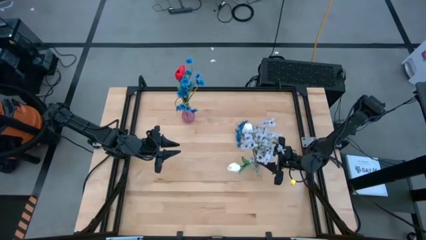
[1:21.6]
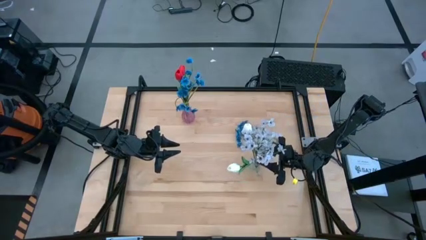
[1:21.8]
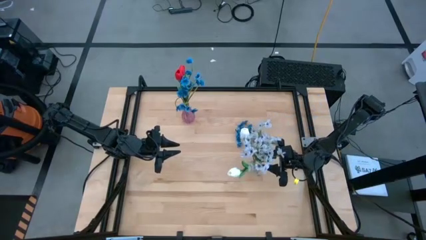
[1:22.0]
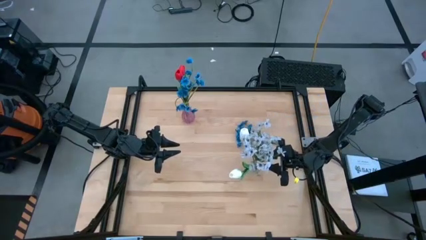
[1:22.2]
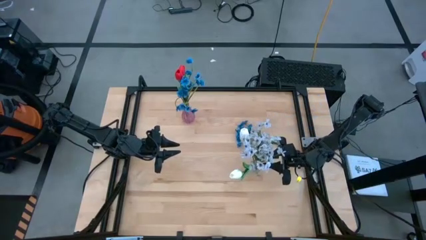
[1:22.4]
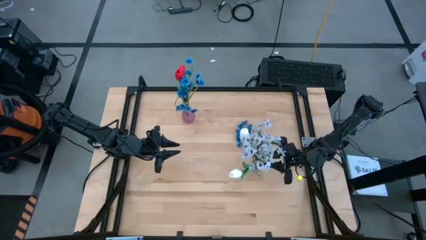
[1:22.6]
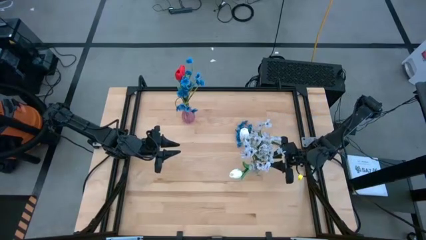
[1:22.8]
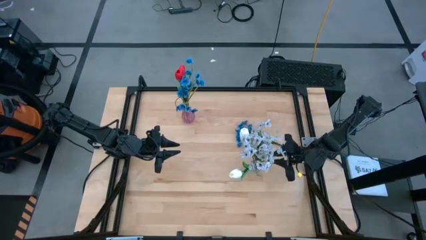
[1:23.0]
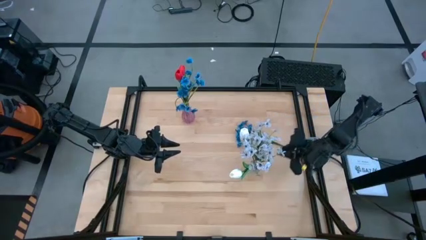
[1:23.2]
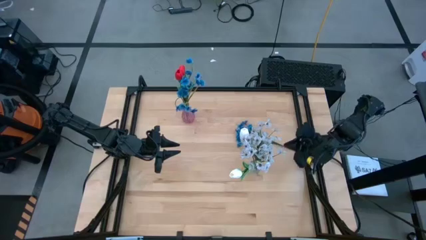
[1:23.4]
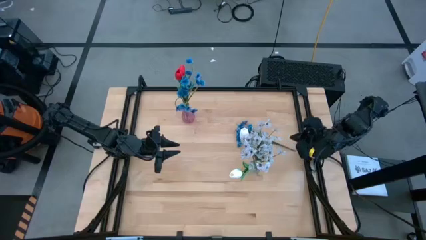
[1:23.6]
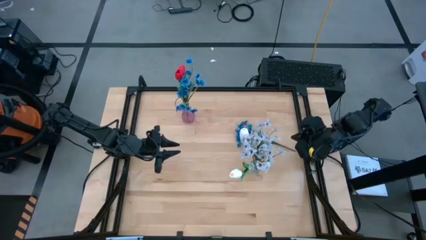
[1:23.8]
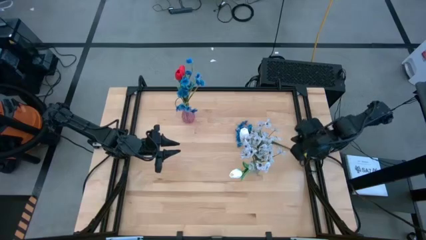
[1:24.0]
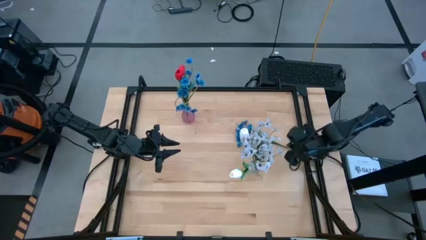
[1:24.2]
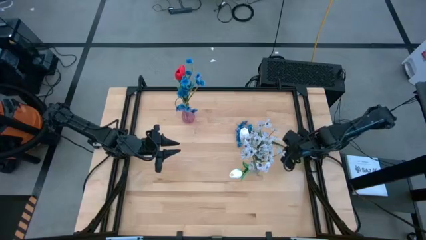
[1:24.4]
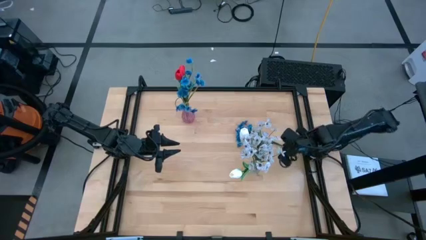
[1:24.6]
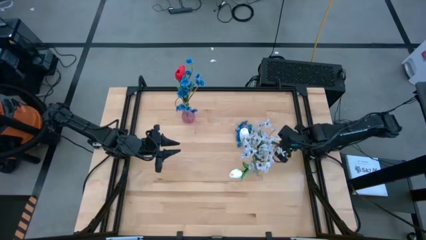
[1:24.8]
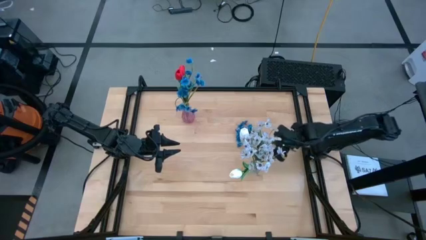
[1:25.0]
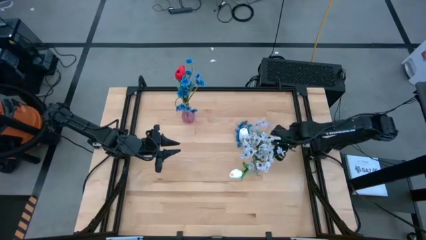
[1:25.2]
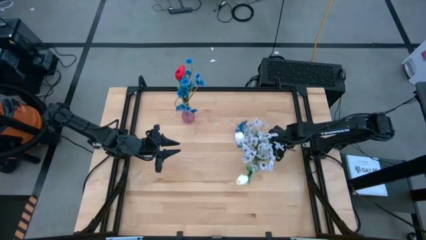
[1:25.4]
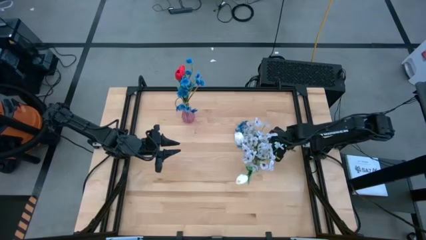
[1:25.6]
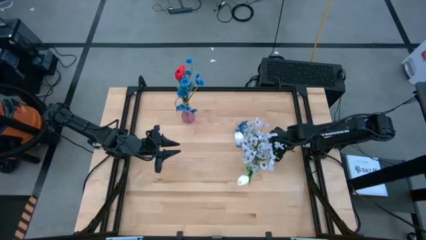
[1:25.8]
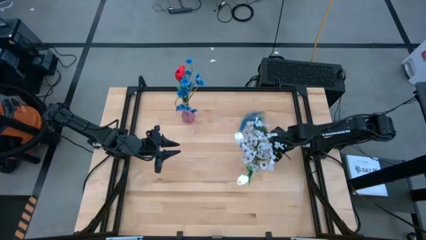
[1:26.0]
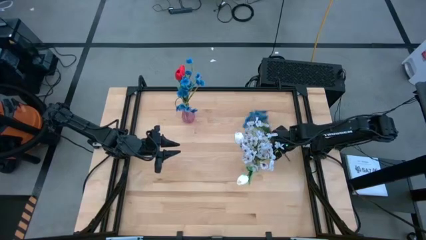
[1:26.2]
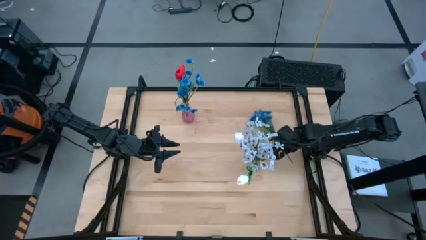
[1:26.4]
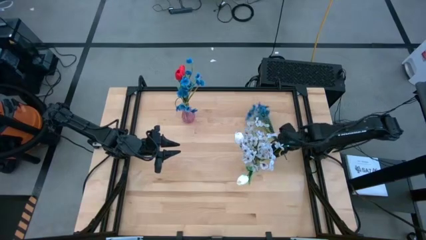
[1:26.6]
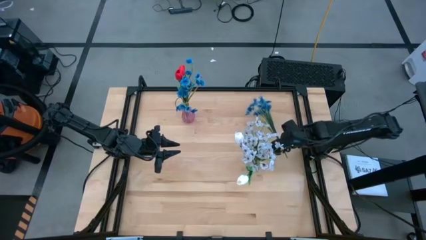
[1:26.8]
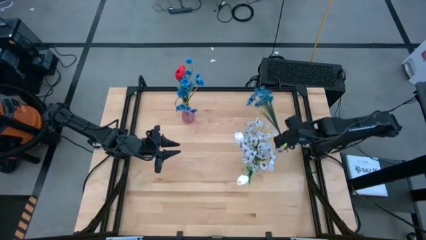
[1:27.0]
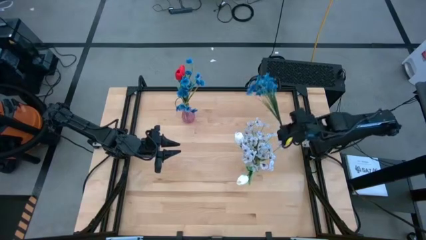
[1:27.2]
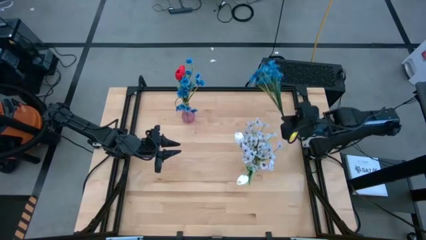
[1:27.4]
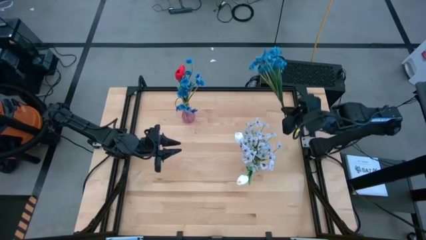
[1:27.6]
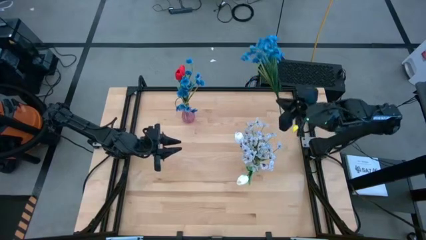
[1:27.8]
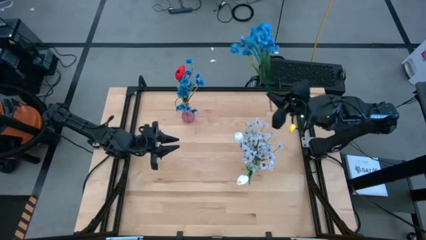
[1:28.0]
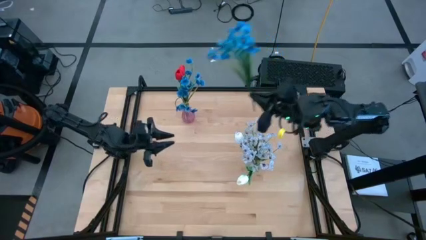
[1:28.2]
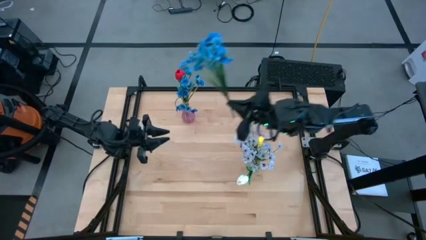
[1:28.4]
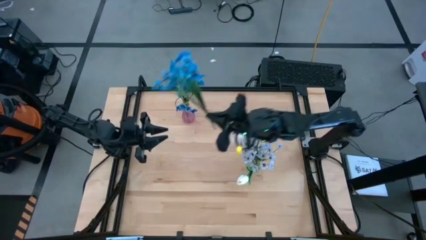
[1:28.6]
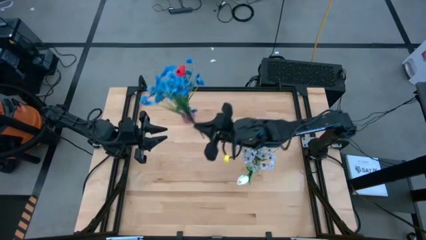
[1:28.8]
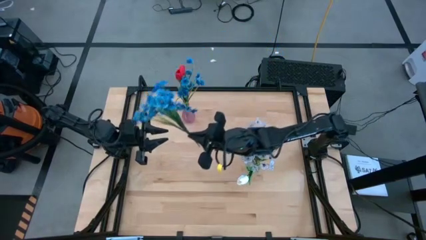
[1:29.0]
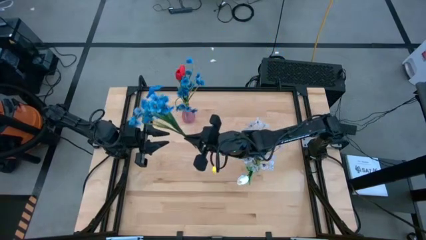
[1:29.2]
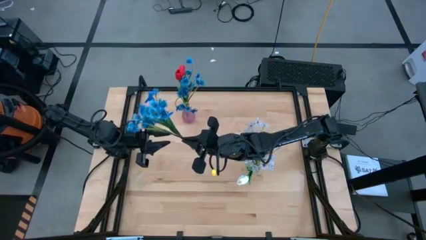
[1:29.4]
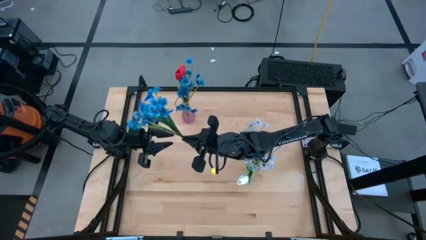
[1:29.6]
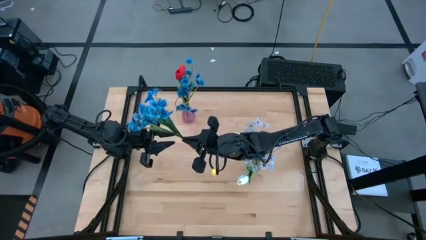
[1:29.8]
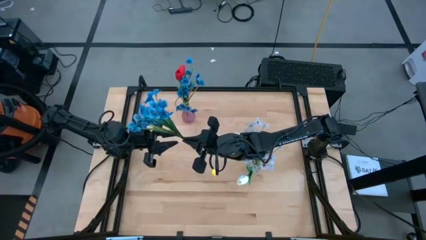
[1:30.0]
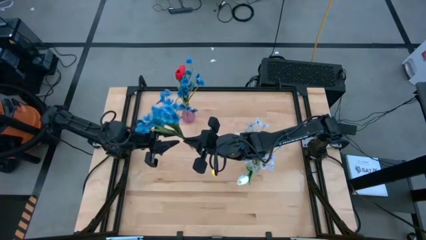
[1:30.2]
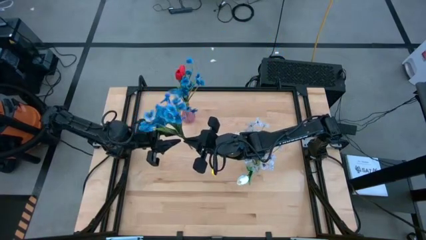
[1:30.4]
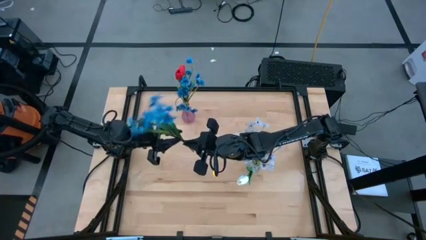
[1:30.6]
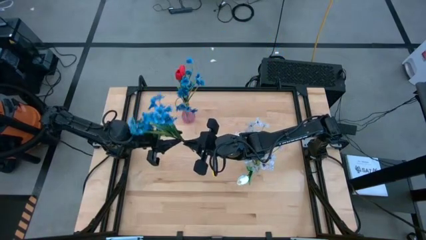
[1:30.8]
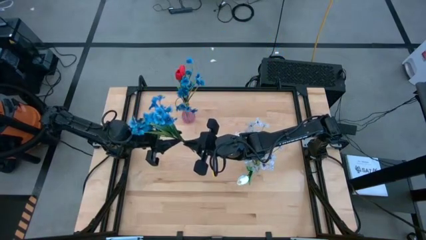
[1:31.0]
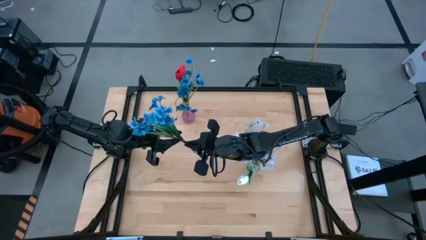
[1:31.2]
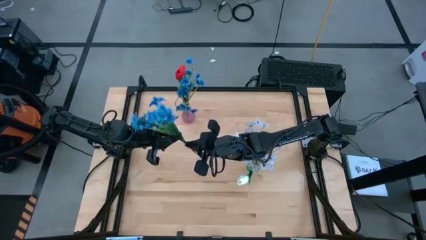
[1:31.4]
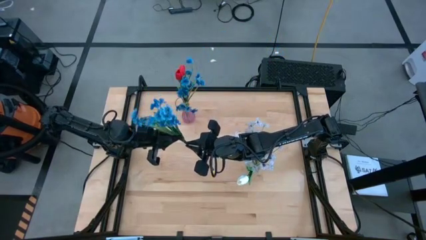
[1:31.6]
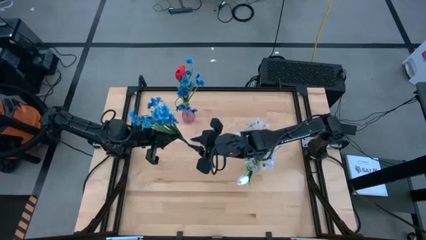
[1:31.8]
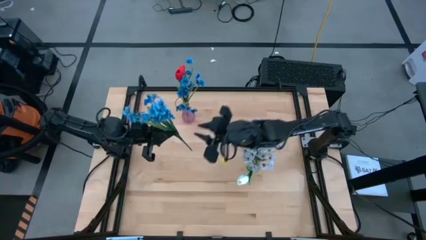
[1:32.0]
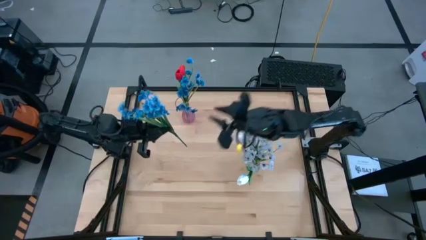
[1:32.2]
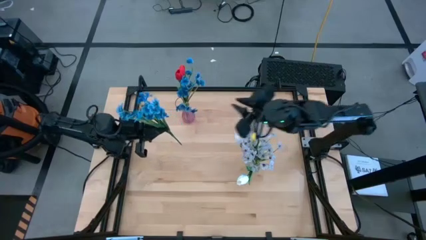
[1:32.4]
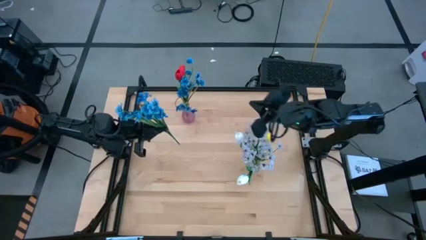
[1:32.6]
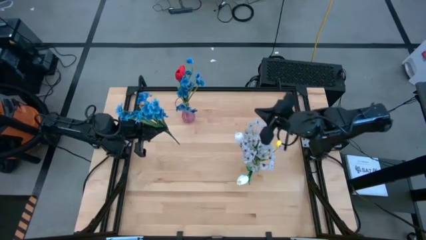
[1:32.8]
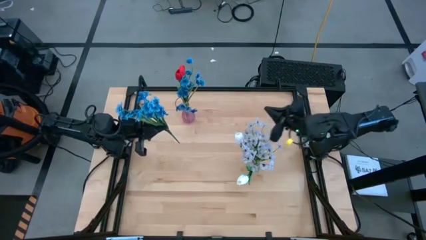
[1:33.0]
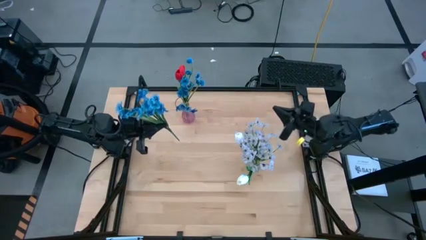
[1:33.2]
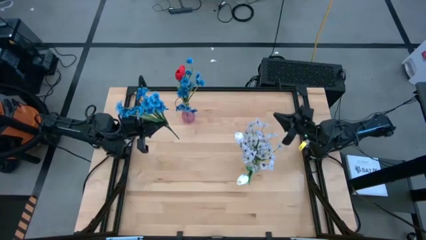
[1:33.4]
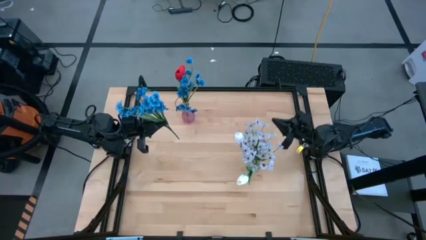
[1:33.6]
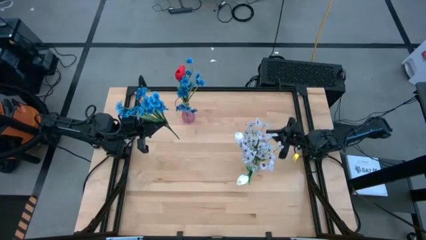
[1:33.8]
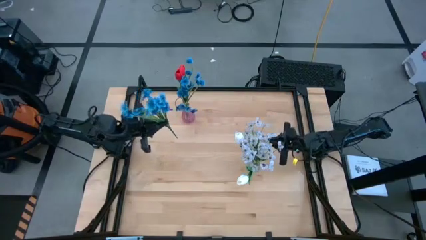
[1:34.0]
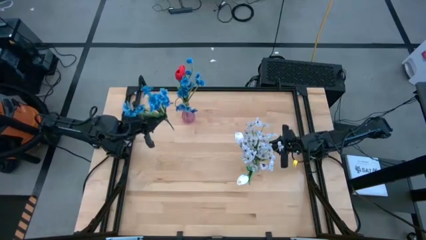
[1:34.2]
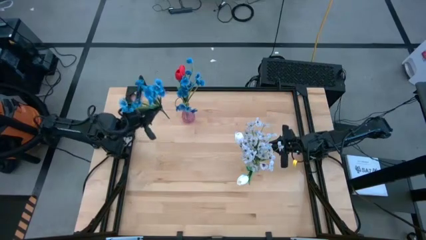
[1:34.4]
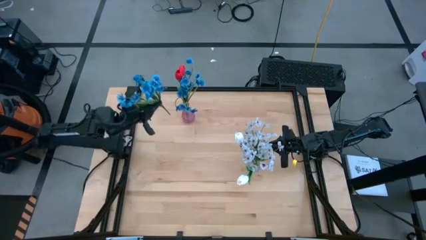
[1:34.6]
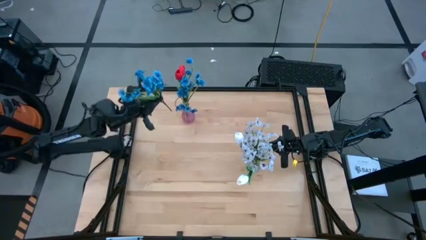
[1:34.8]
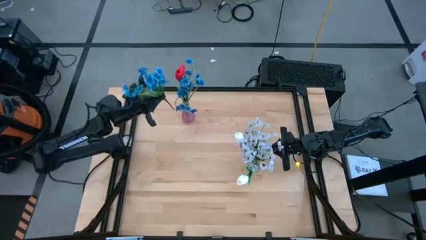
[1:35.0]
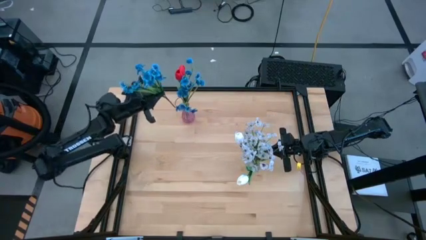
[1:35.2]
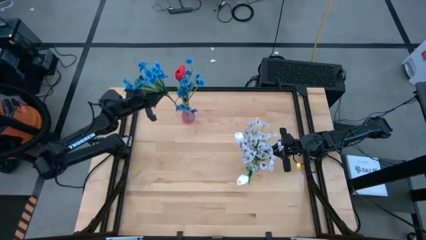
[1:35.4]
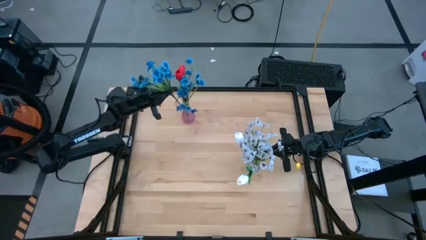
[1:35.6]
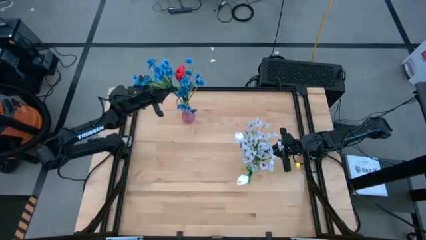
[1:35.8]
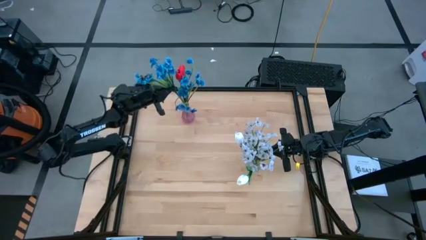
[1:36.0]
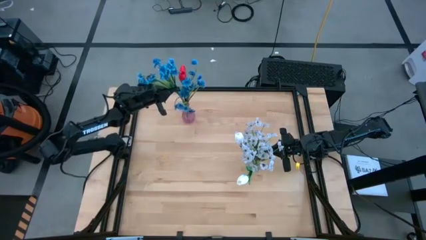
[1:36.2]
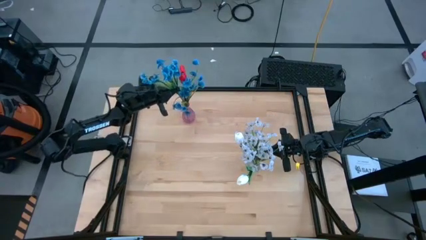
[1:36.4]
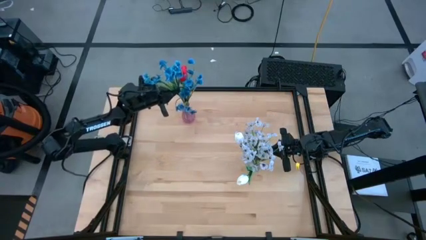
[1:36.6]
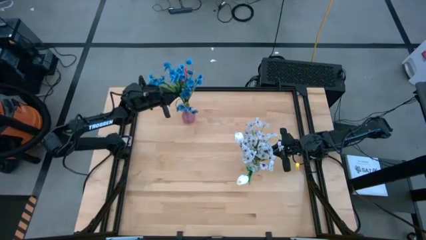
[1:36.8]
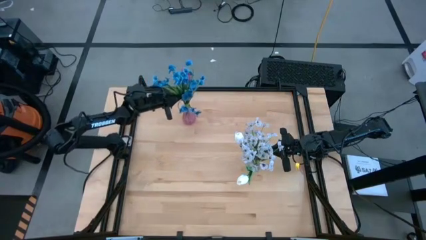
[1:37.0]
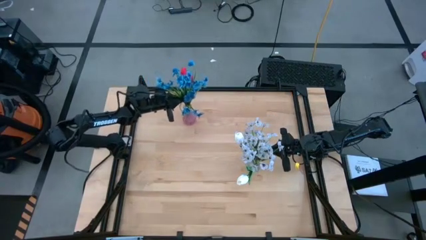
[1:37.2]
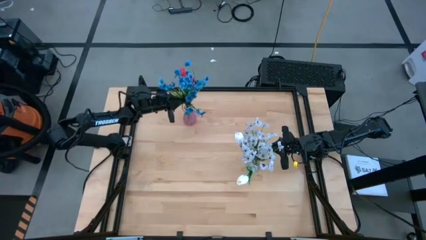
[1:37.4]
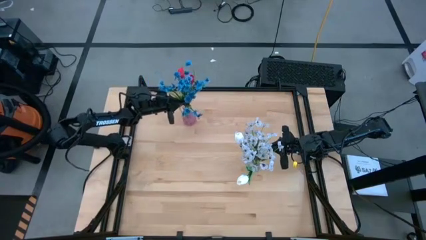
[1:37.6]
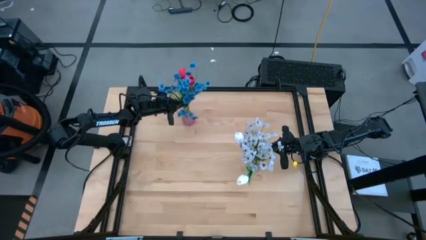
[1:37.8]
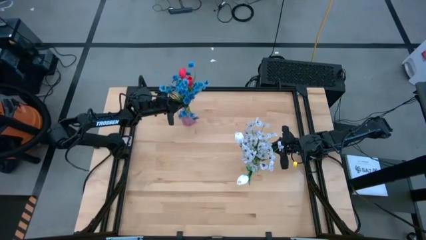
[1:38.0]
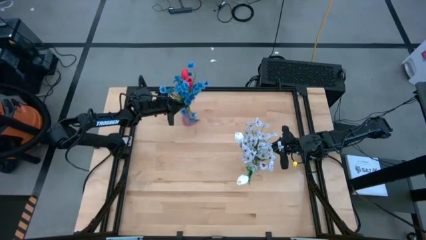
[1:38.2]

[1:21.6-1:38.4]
Task: Sort flowers into vase by color
Put the blue flowers into the pink vase
